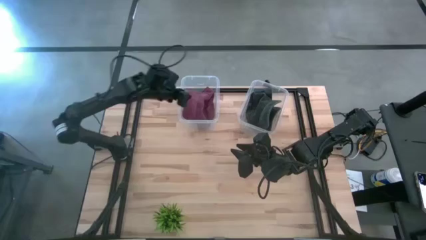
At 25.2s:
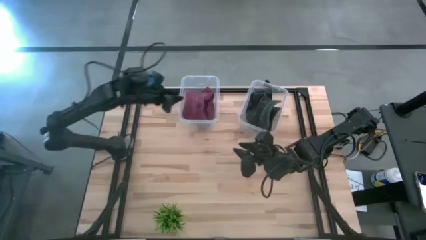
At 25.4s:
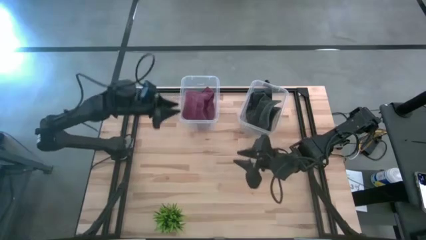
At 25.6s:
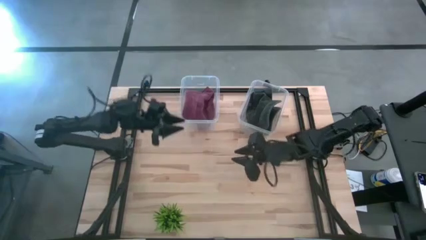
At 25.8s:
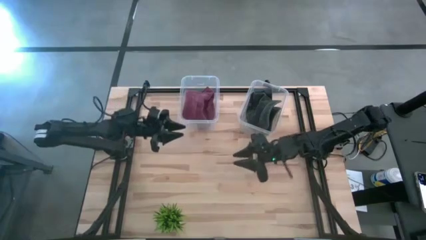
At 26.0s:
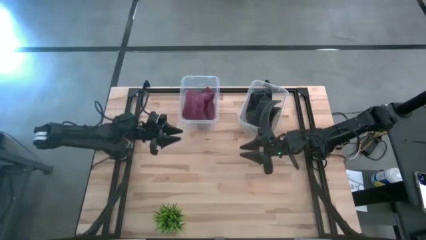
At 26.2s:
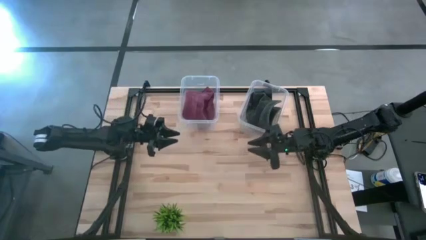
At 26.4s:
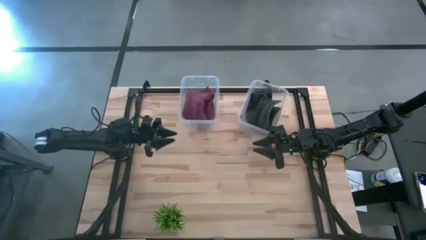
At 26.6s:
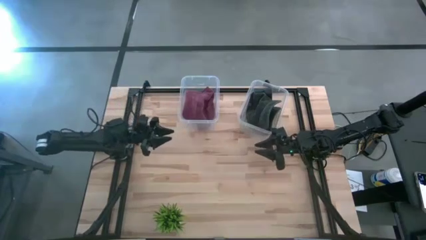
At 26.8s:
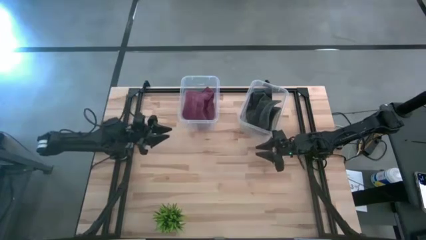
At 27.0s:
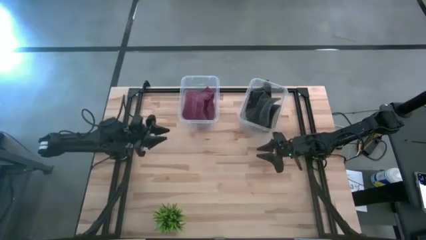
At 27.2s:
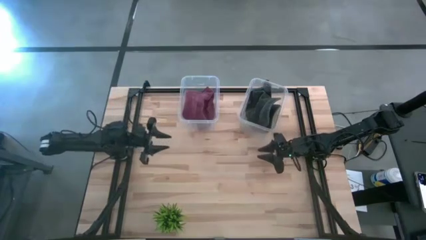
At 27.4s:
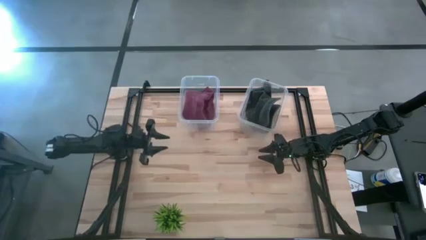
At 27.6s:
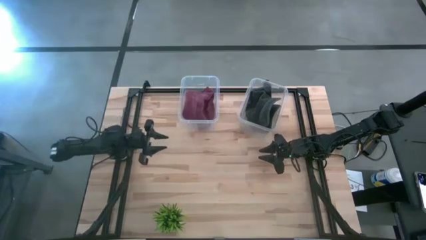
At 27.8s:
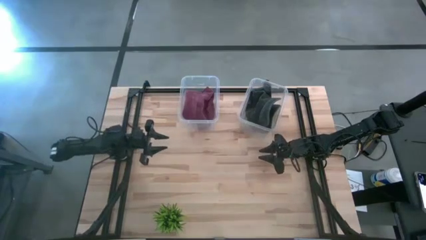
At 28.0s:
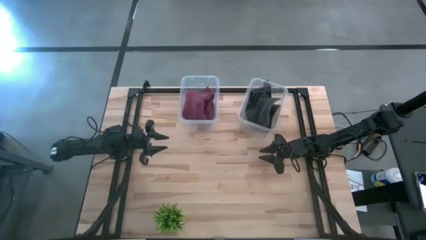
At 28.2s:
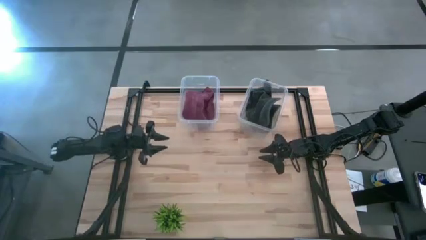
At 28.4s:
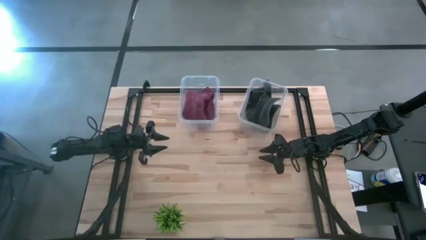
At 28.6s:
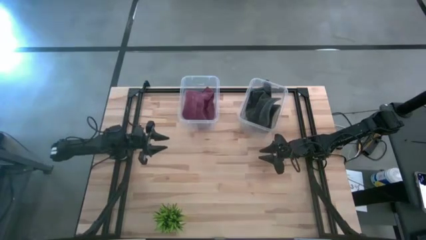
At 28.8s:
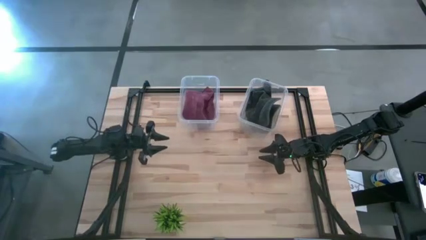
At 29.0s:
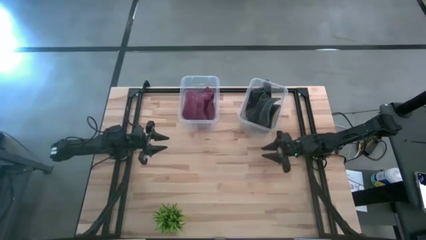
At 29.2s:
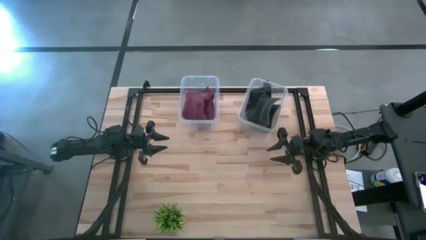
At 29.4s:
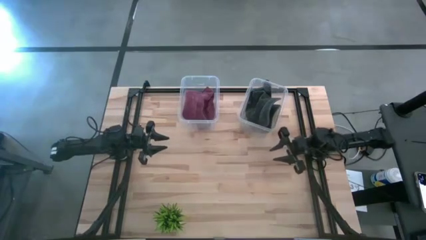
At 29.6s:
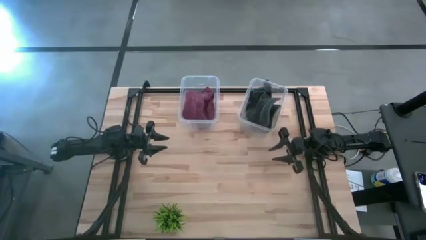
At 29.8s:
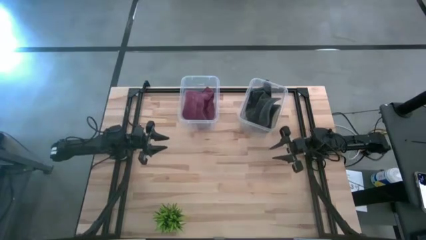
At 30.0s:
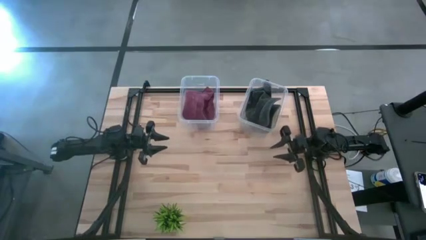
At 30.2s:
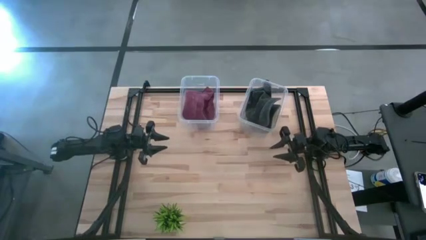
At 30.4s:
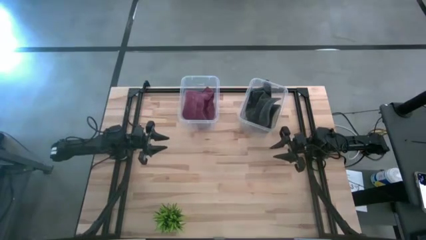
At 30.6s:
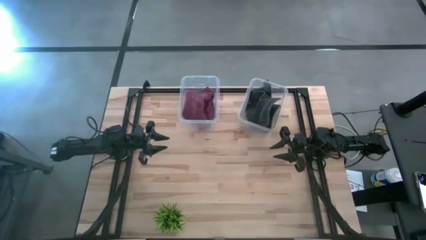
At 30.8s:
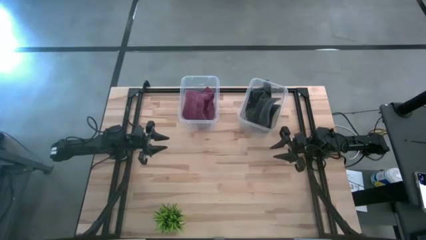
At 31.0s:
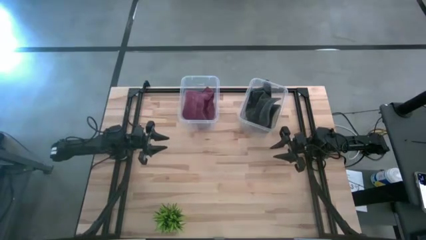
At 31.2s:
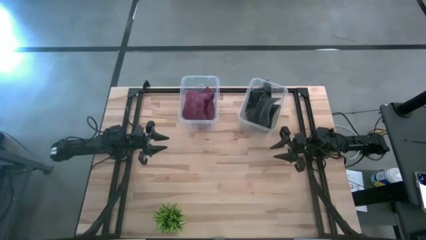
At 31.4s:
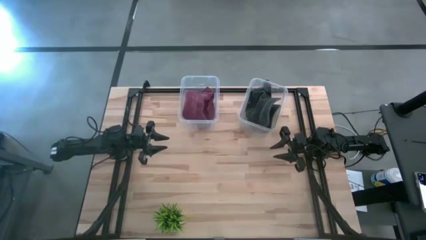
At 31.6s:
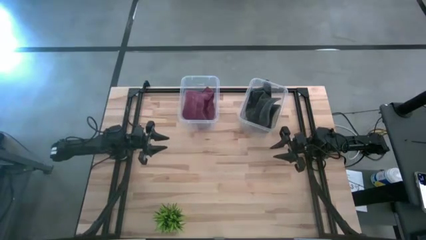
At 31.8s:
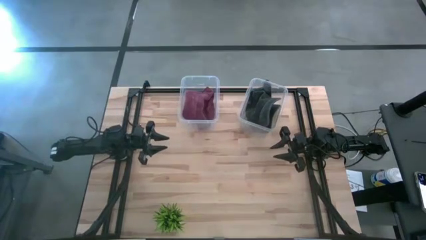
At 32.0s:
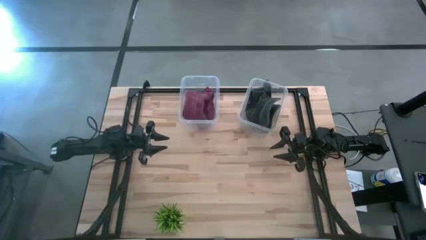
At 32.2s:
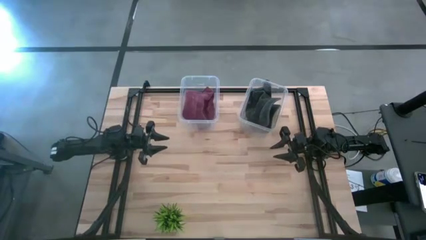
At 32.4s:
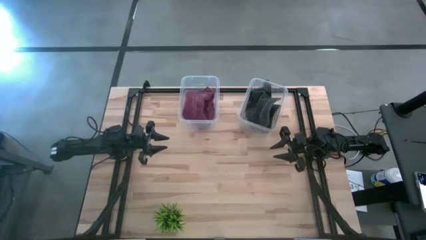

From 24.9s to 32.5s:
Task: Pick & Place hat
Return to Home Position

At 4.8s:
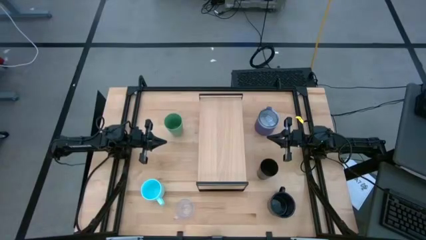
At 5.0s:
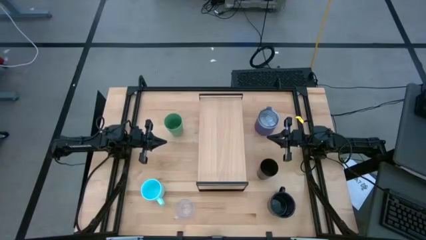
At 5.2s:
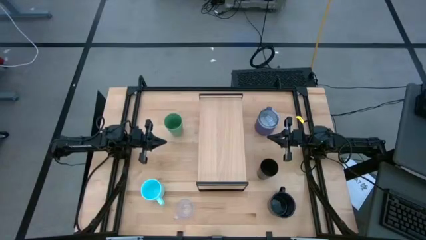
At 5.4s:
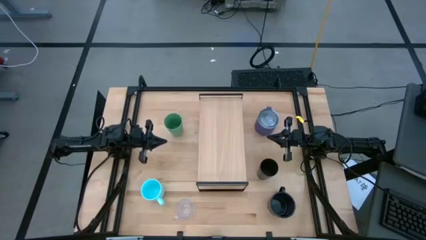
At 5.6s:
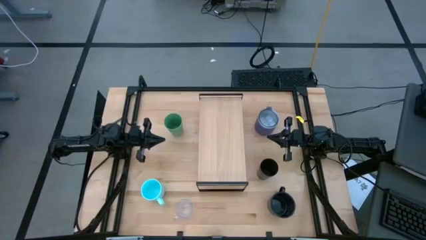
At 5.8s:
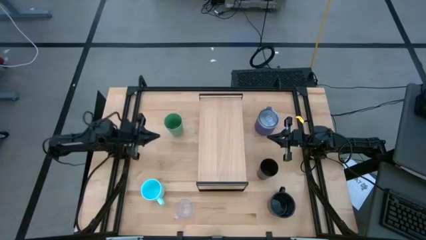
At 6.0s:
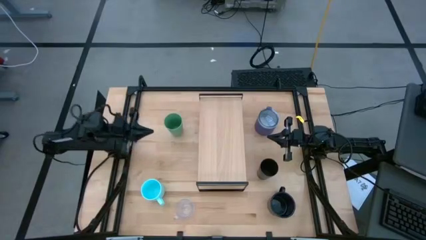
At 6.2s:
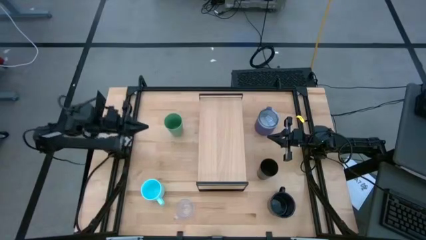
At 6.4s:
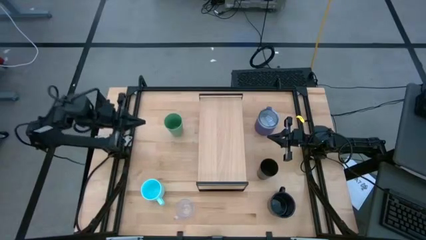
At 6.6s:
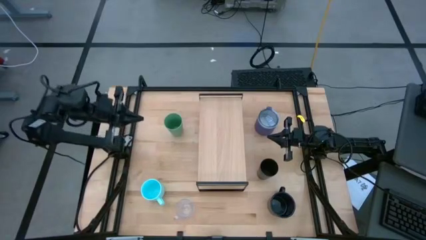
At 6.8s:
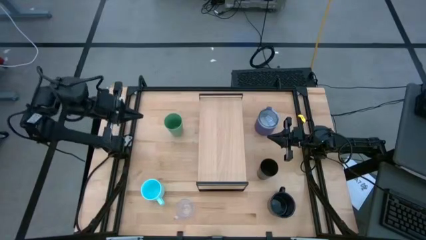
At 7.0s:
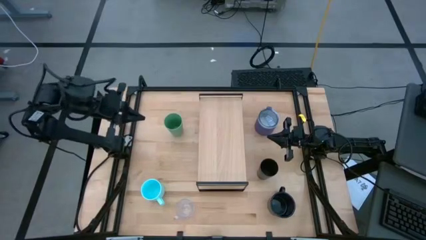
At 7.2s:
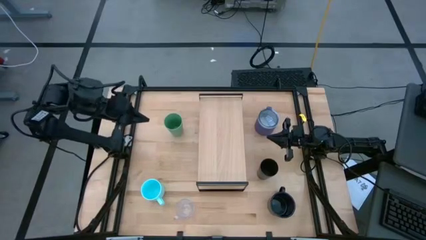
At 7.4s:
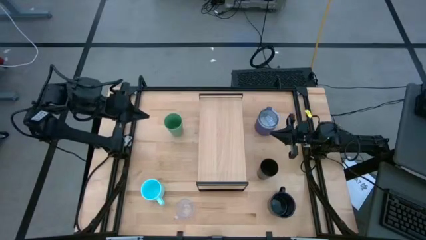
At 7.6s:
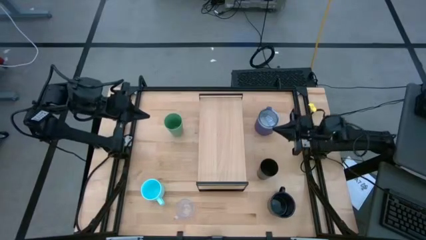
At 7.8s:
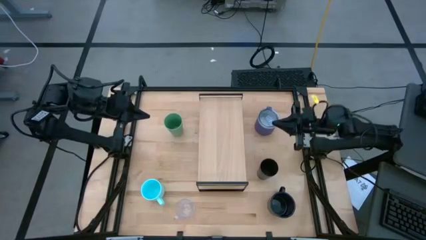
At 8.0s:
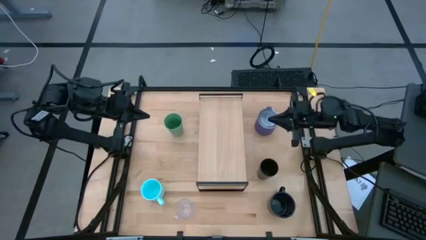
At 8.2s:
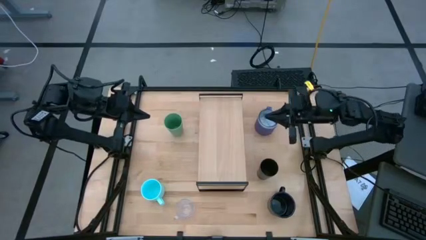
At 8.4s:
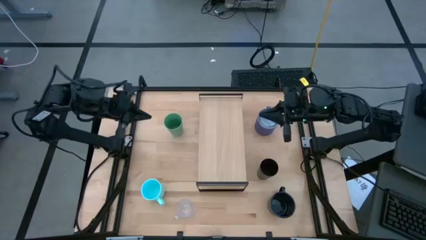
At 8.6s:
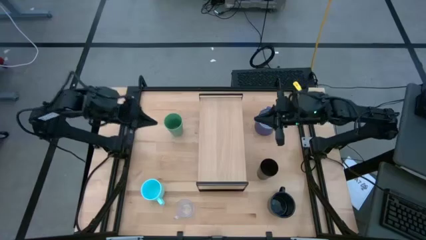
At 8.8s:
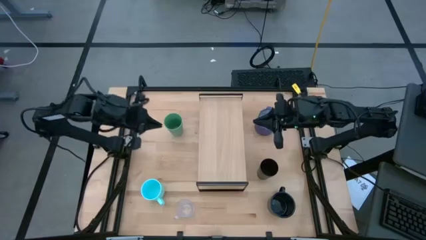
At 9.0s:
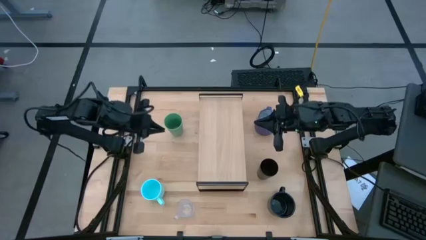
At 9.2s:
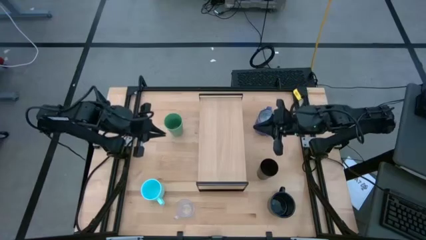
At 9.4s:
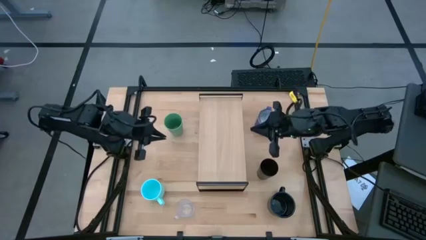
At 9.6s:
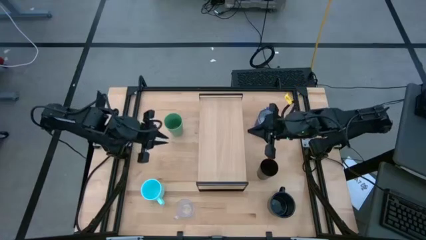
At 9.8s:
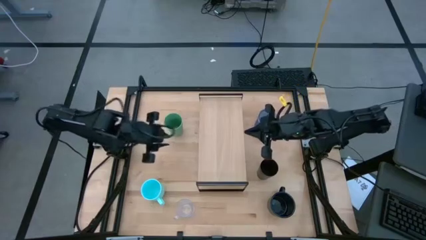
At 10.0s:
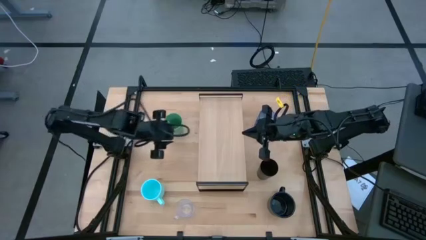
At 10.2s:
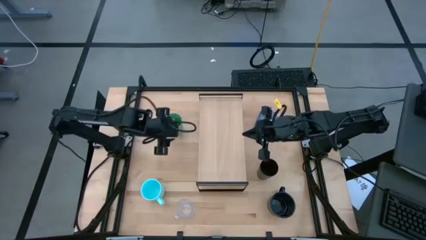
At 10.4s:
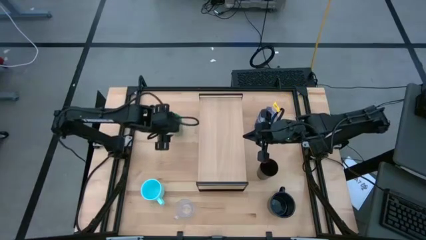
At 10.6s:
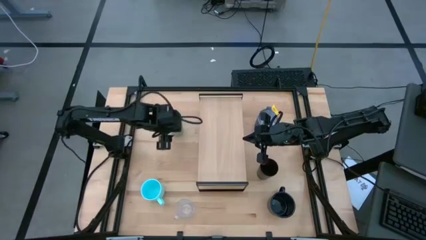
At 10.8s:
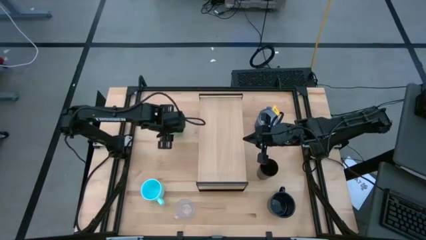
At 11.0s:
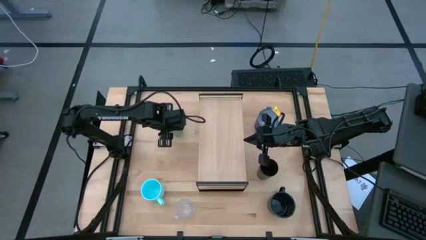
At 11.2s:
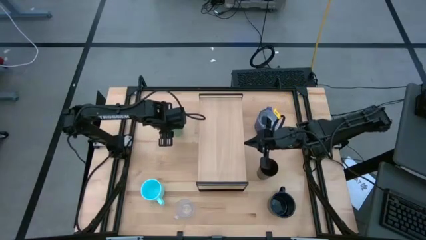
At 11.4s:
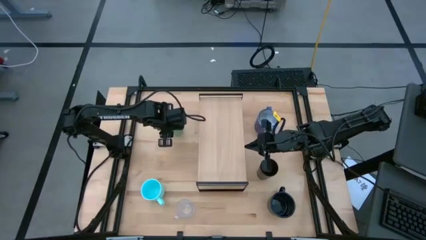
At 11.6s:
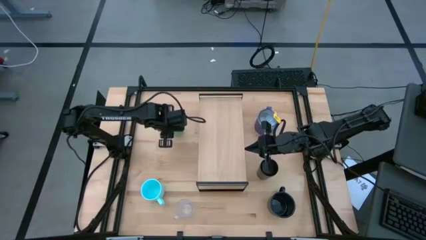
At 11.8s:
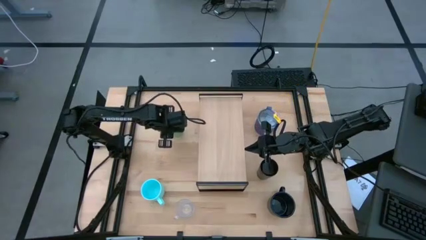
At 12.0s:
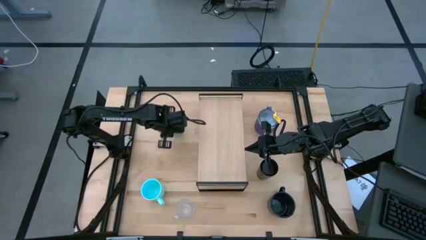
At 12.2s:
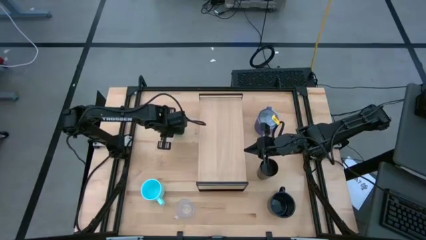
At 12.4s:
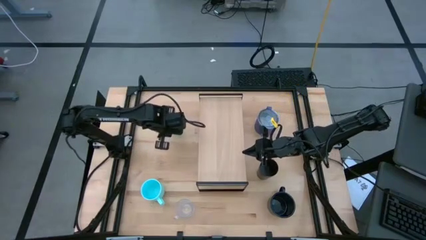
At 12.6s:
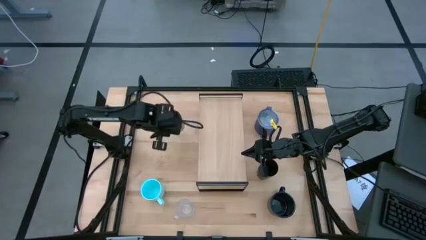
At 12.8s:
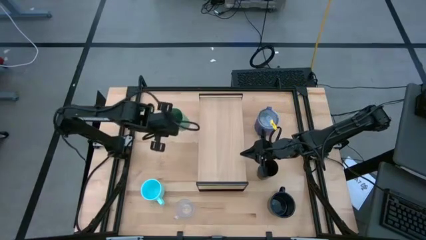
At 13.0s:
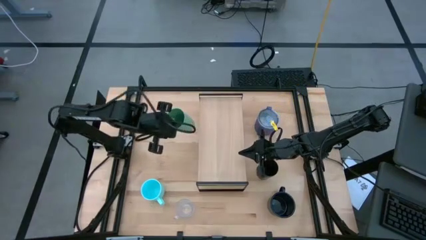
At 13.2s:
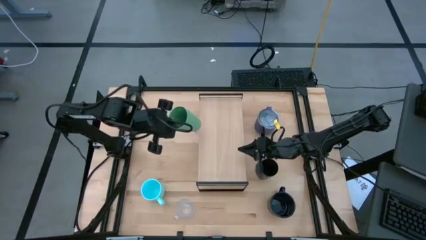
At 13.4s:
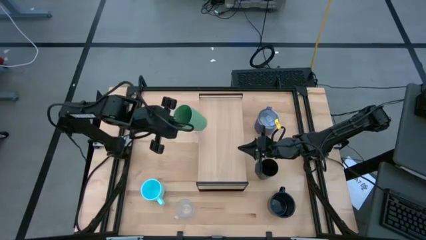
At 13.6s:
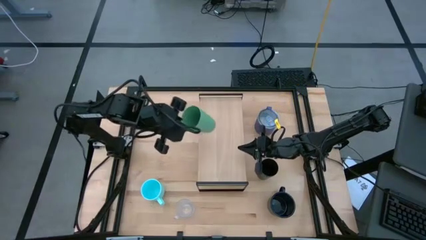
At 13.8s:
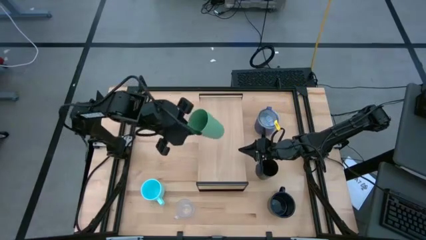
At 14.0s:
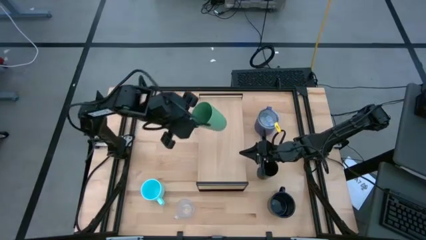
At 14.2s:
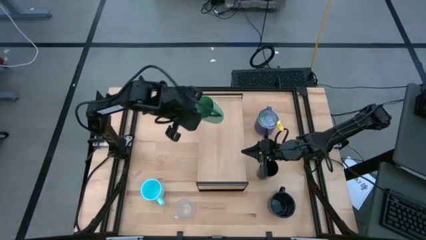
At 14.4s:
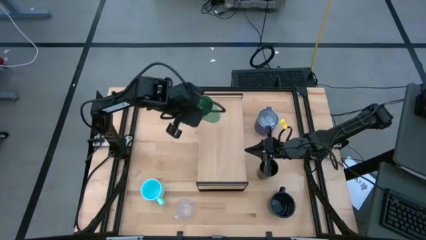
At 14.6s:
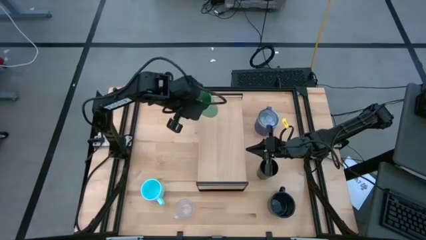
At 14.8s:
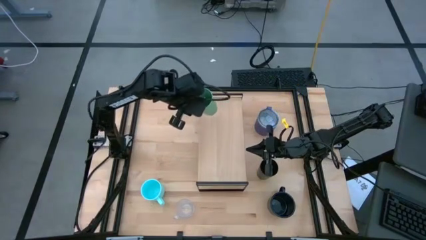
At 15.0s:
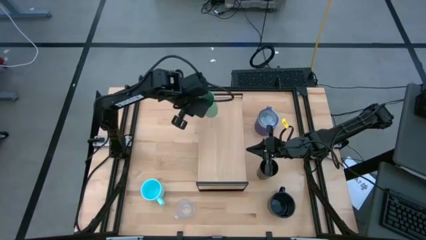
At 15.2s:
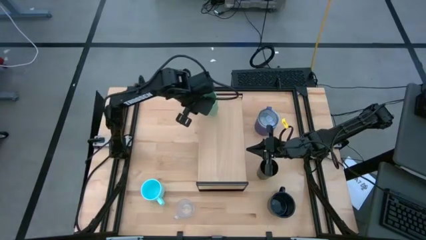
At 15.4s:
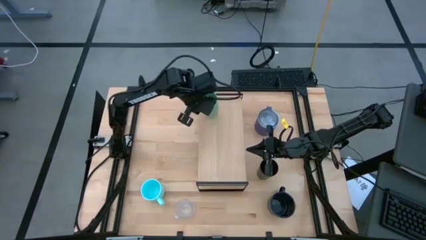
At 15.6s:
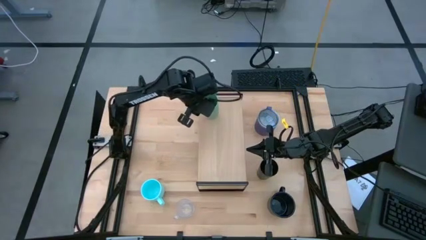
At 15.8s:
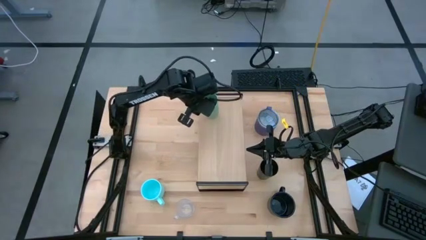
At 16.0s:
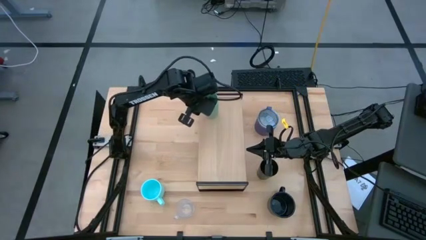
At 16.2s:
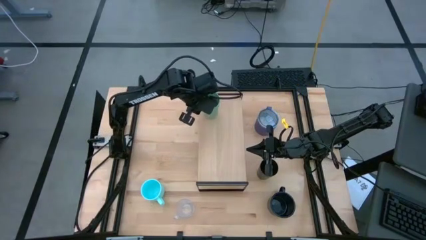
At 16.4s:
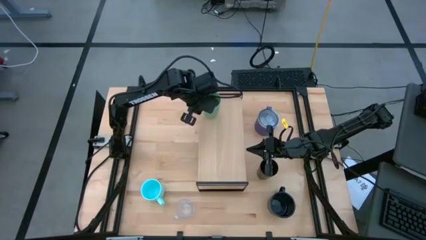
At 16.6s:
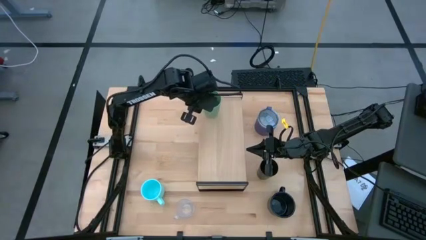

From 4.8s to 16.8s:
Task: Stack small to large cups/mugs on shelf
Put the green cup on the shelf
